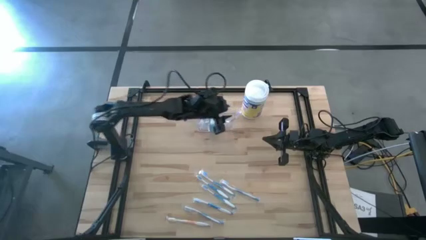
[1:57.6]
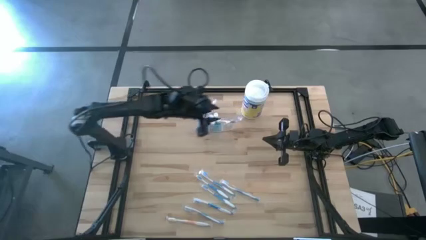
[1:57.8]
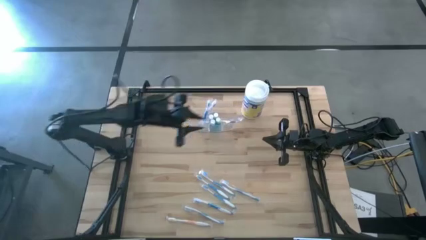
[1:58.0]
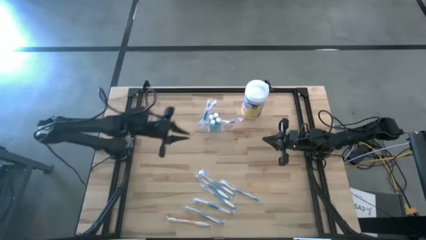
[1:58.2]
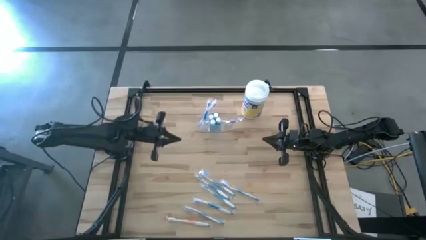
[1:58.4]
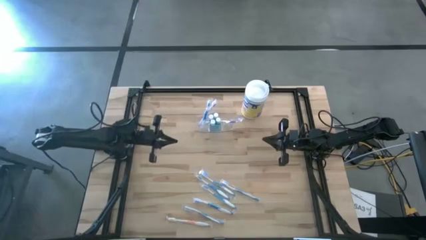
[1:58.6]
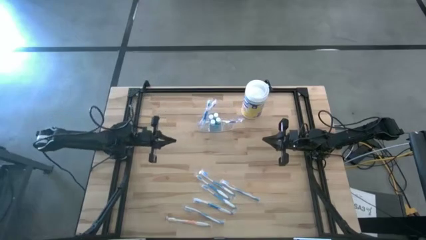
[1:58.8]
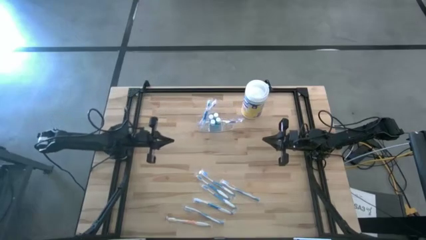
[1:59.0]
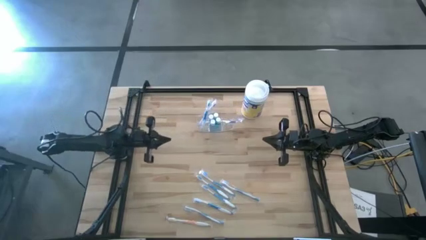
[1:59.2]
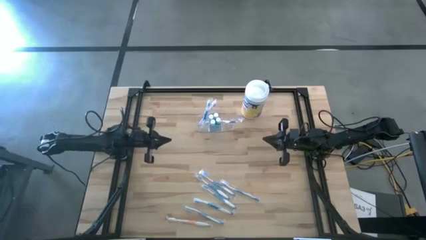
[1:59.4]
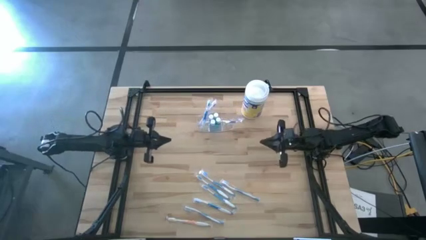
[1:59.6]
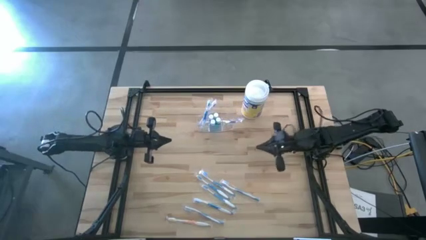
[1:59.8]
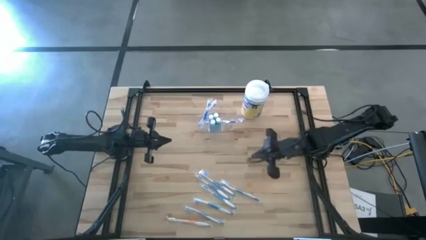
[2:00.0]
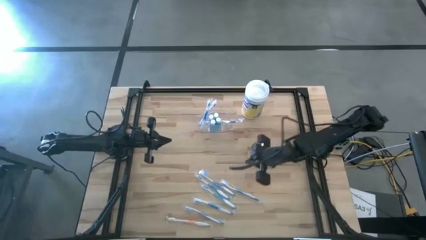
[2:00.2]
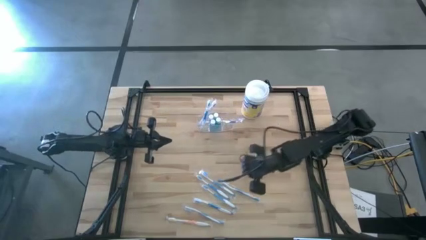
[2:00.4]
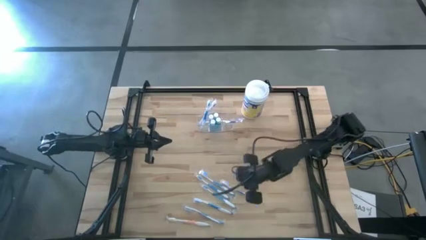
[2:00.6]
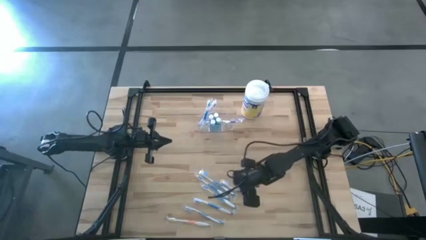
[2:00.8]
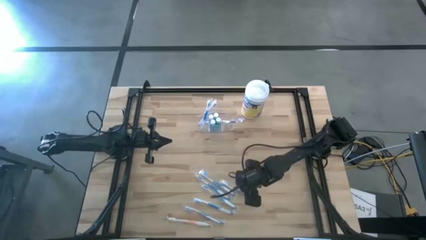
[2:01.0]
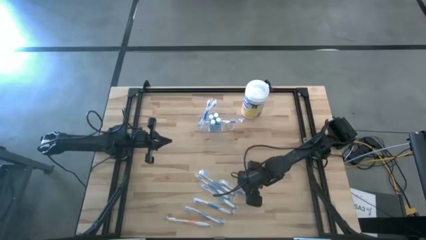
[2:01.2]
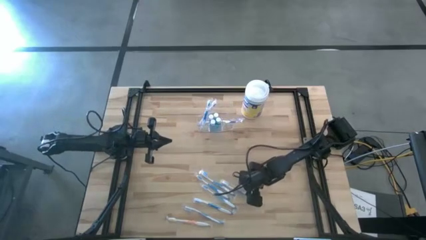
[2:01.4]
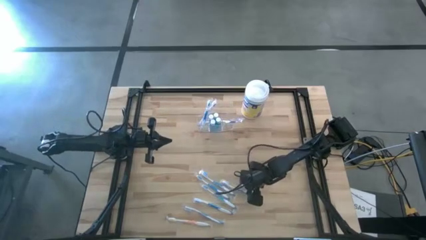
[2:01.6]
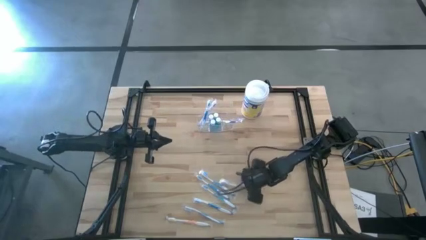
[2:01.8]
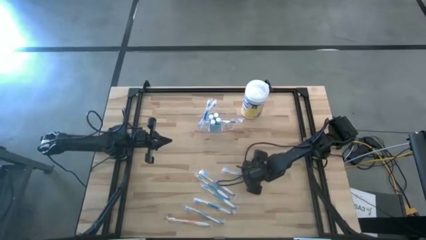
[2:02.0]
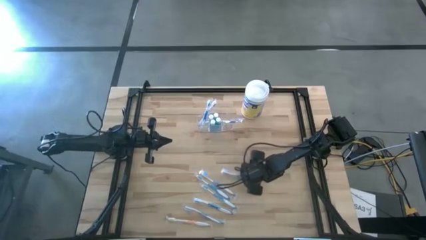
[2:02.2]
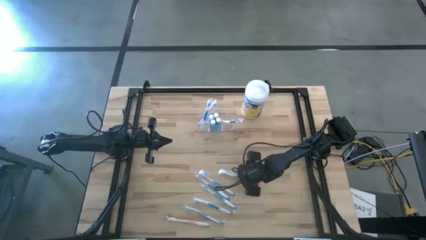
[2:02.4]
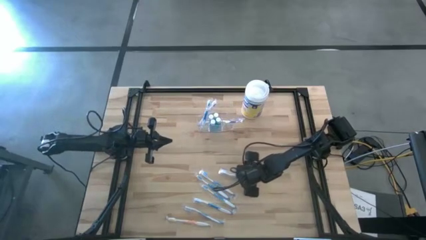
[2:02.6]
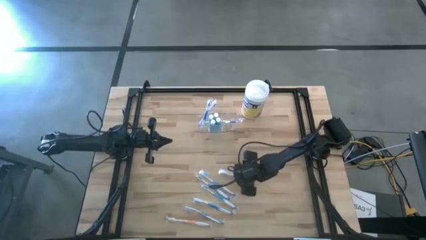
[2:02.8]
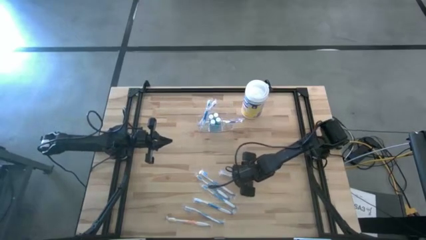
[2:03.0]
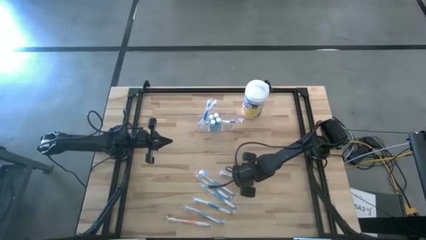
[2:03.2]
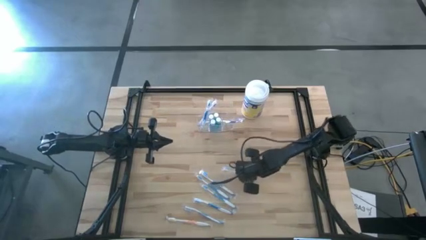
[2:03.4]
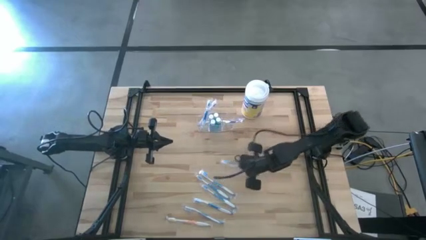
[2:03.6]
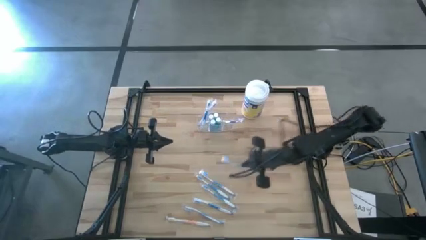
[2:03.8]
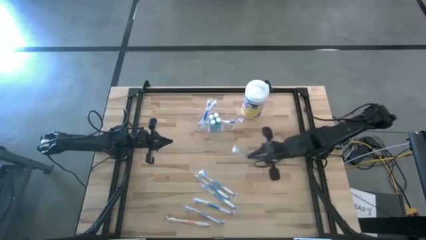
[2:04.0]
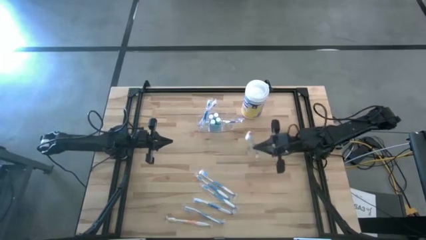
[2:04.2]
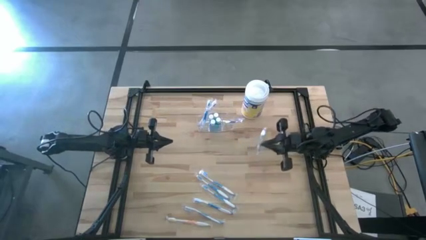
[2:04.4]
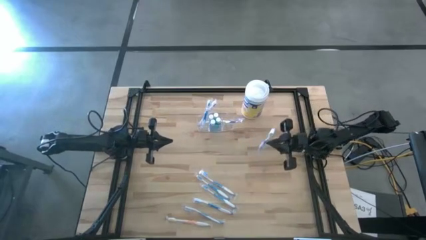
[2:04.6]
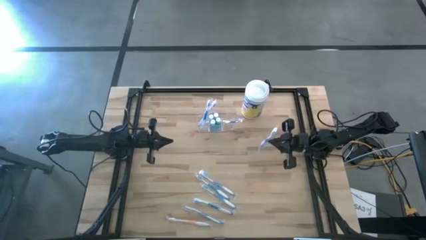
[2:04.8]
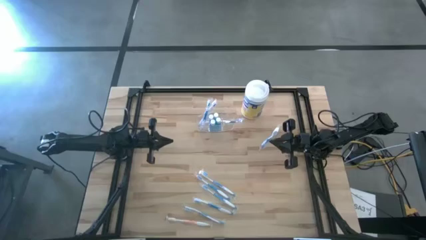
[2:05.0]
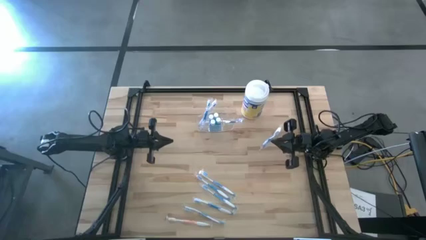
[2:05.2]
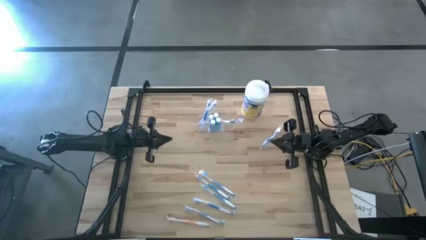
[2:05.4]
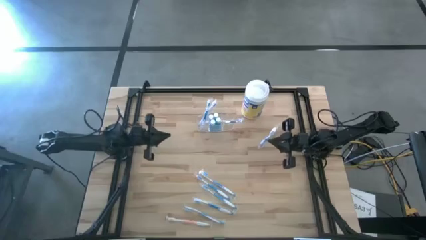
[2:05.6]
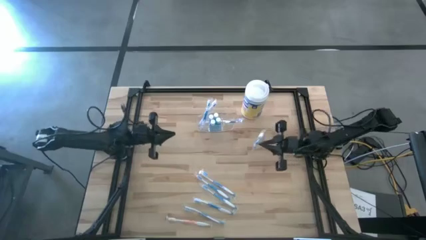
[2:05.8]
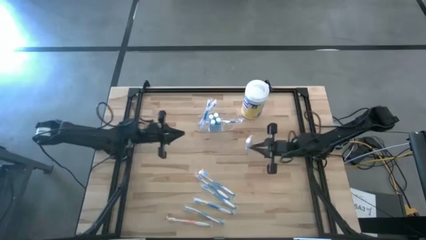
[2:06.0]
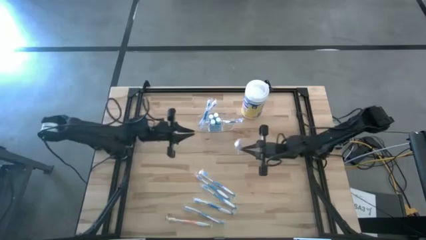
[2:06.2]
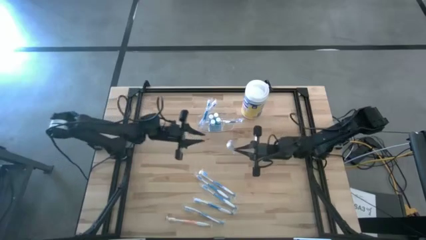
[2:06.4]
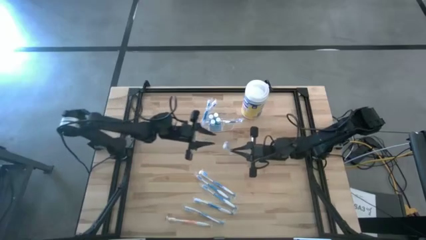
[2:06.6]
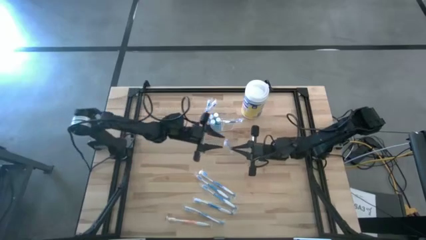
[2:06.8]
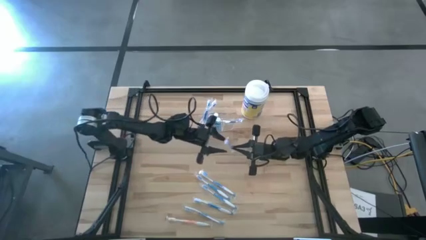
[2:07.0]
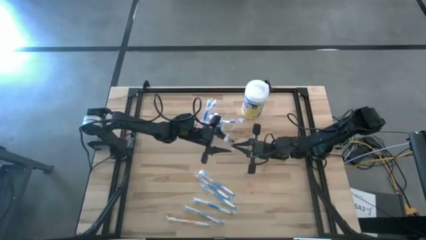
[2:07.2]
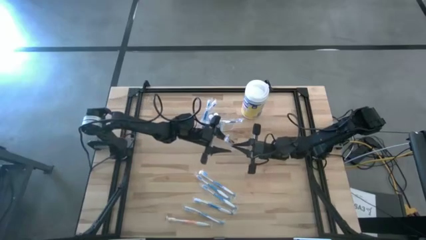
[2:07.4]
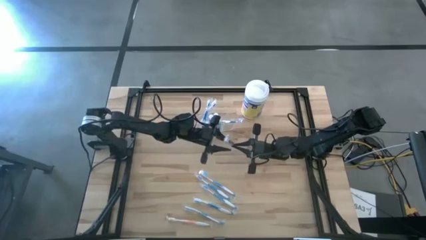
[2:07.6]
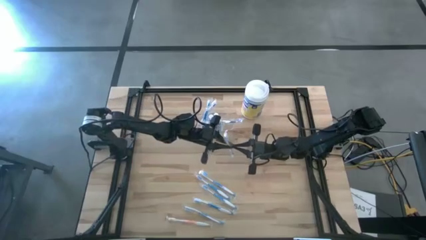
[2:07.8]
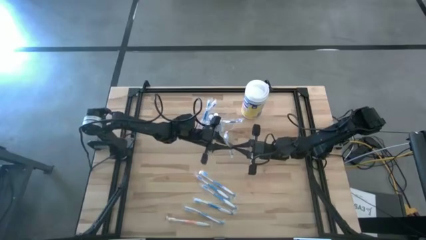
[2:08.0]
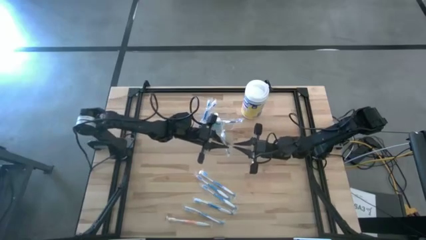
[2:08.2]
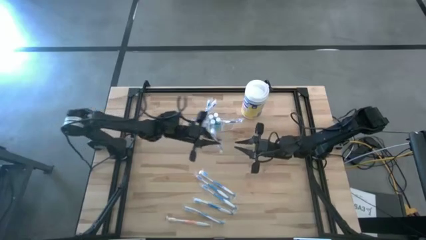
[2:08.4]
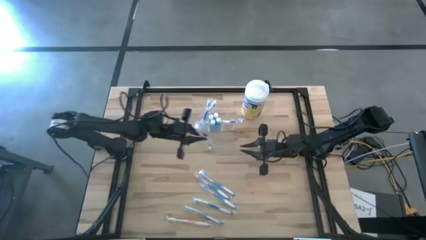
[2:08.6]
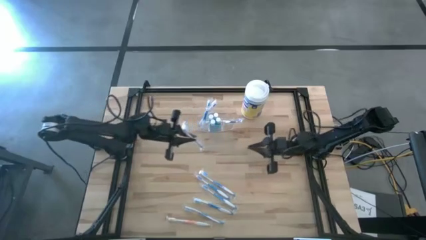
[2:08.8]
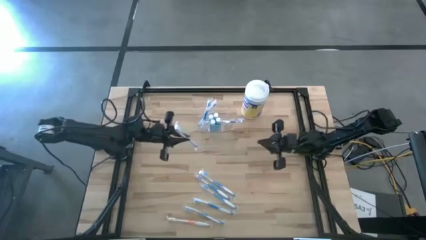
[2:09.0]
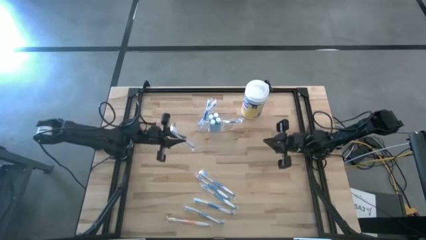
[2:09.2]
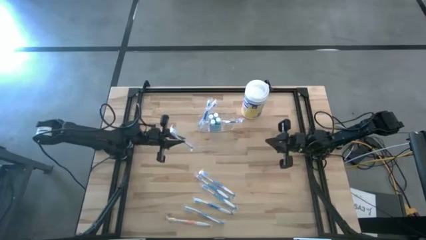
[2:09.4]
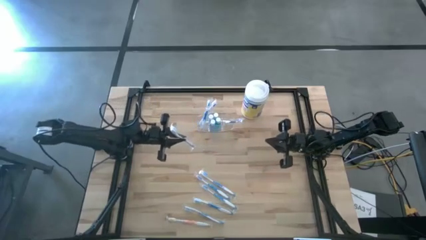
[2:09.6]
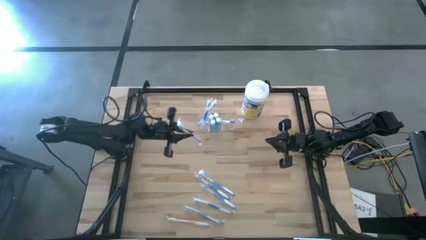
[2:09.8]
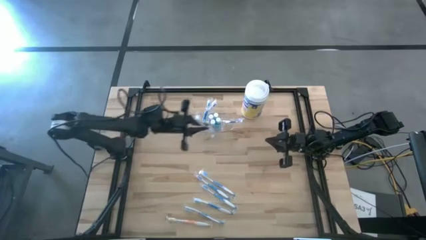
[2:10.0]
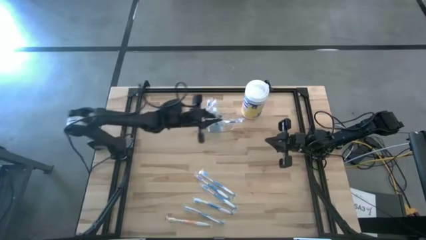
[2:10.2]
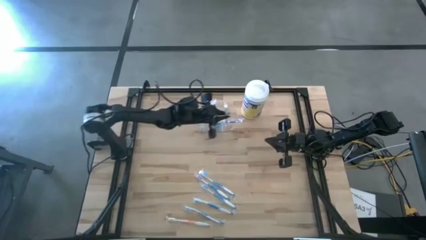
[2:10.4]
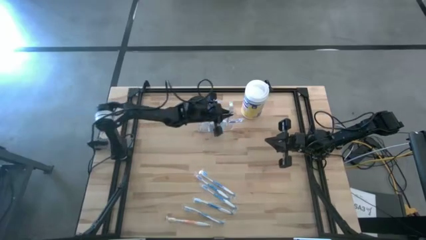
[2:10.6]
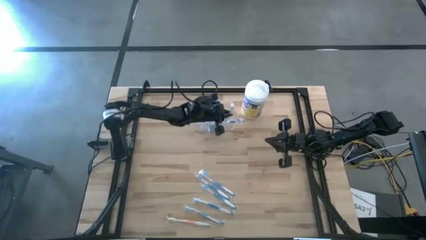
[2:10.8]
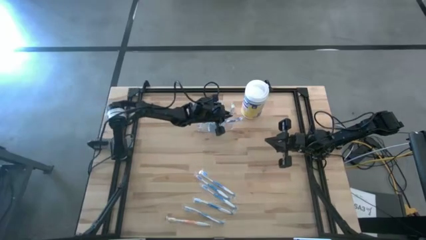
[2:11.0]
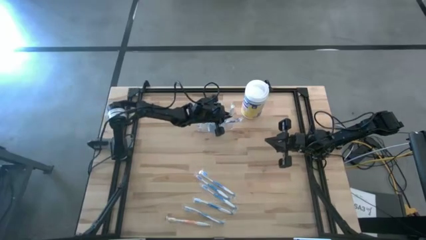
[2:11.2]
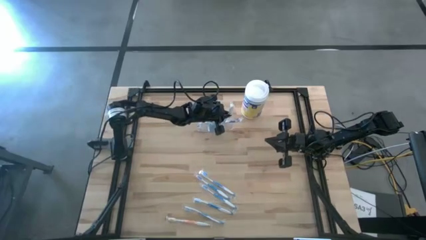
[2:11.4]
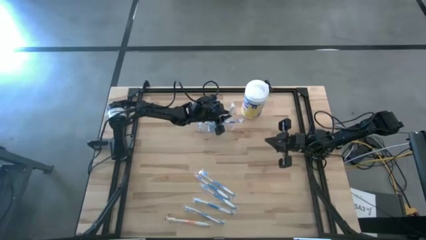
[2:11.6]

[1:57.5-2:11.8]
Task: Pick & Place toothbrushing station
Put the blue toothbrush into the right section of the transparent organizer

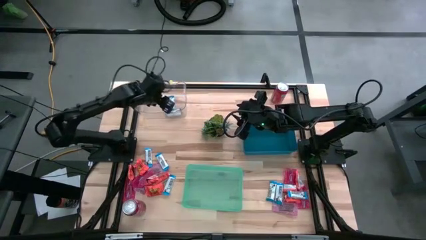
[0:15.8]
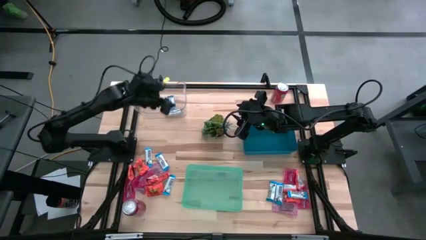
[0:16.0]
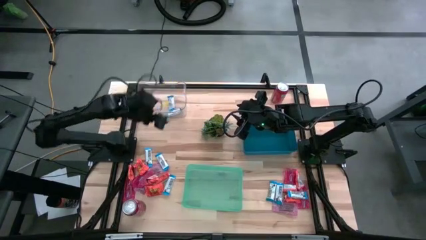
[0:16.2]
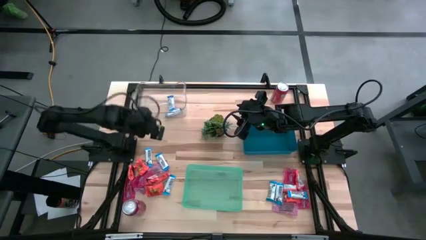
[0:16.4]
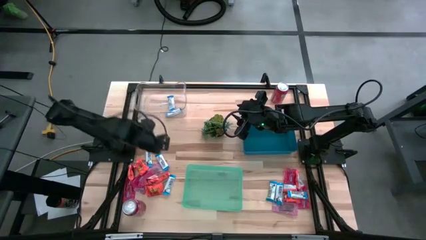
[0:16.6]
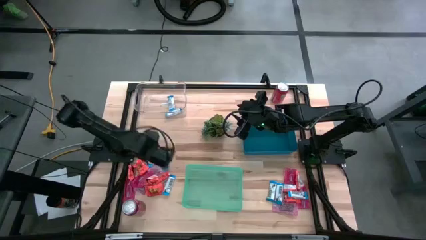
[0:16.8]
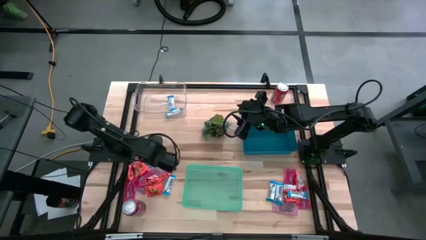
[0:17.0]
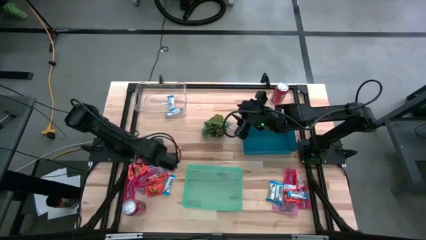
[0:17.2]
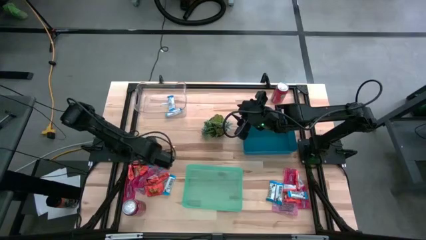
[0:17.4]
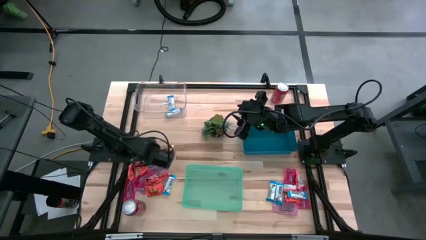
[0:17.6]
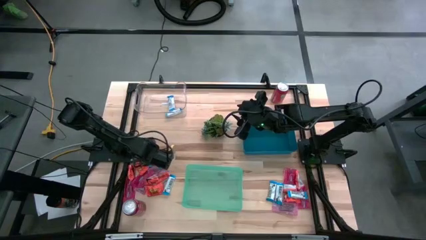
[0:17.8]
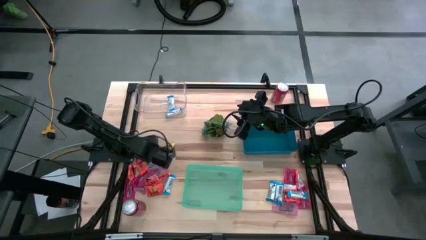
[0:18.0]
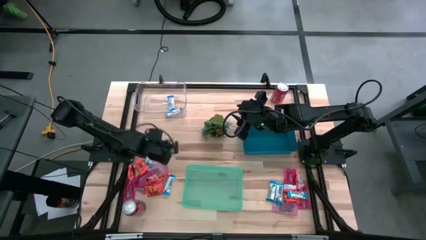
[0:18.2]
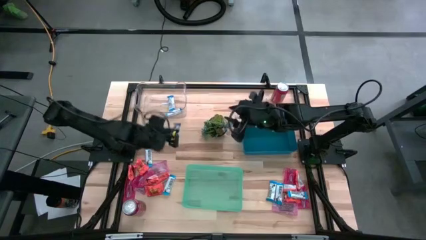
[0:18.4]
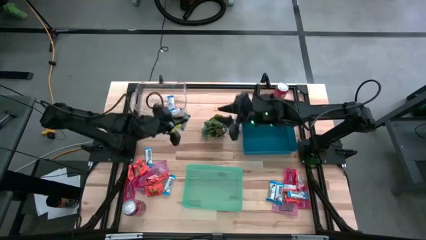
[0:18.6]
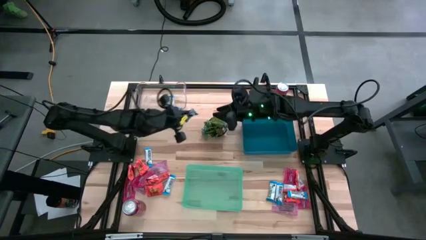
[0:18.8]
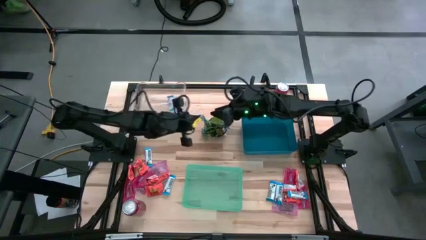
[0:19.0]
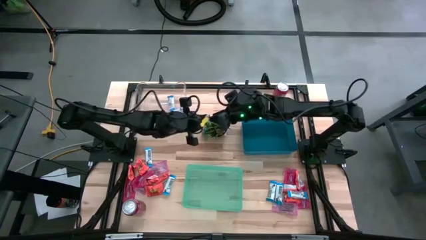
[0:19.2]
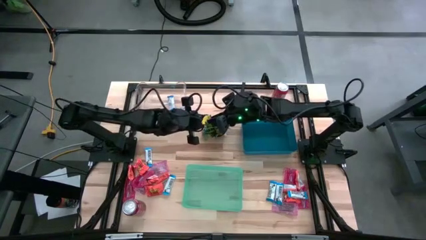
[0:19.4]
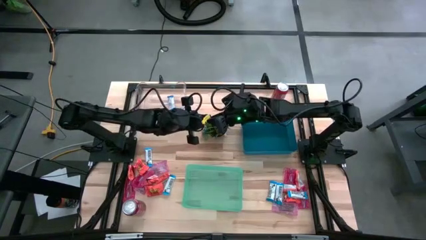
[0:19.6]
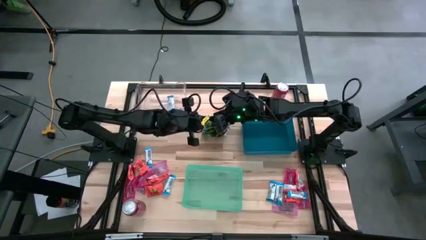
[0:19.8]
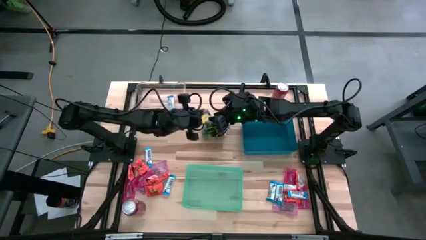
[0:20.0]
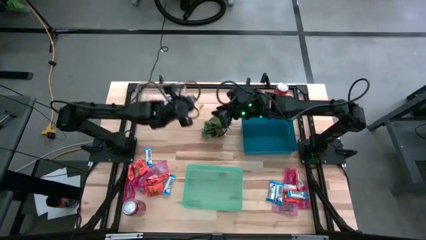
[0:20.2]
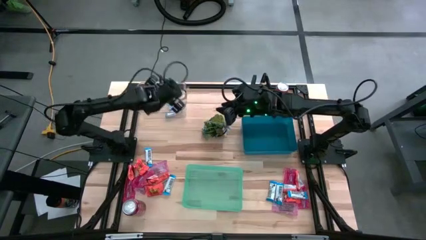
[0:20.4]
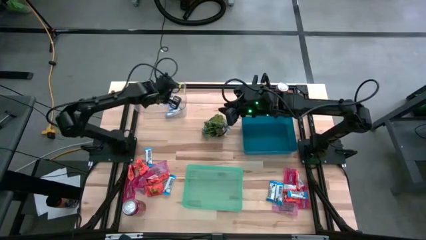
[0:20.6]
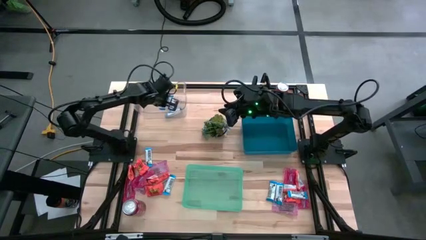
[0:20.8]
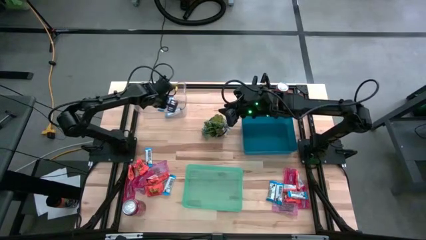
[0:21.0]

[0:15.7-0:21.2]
Task: Sort candy
Put the white chocolate bar into the transparent bin
